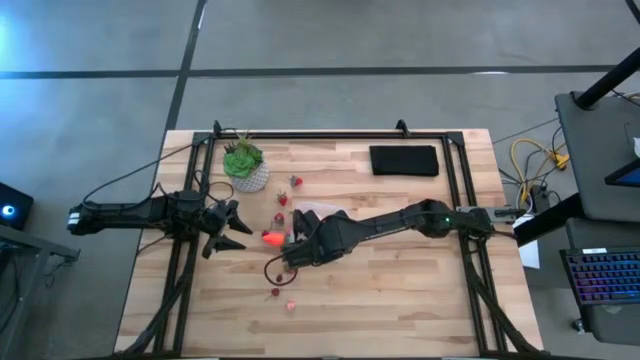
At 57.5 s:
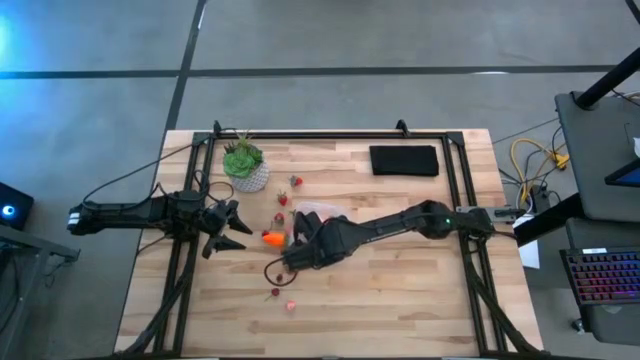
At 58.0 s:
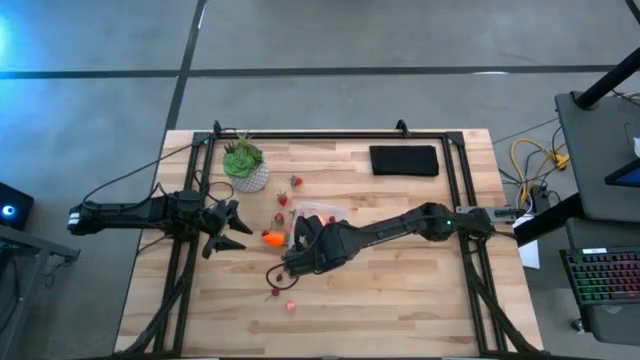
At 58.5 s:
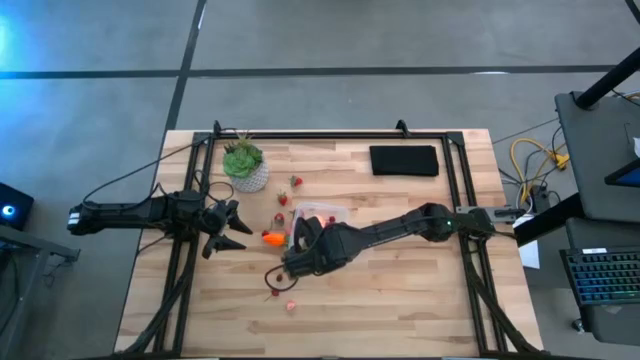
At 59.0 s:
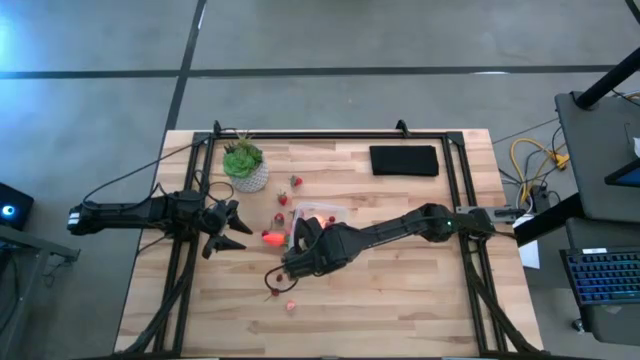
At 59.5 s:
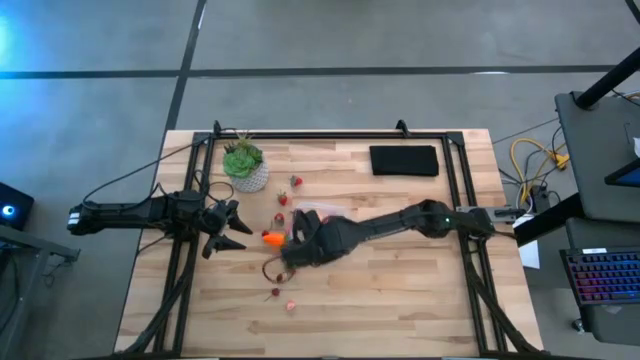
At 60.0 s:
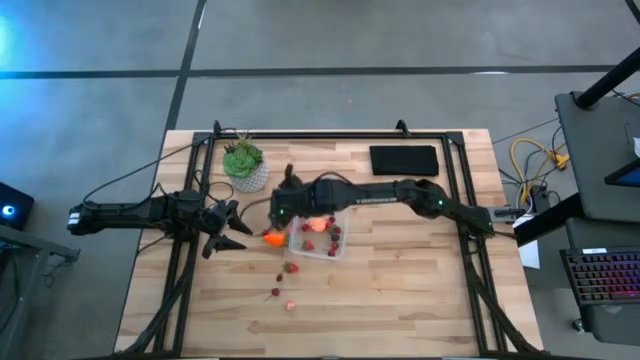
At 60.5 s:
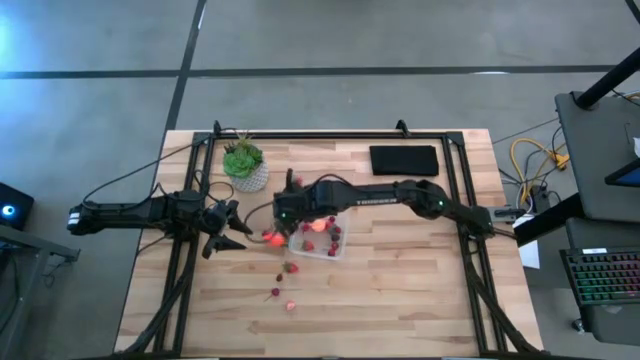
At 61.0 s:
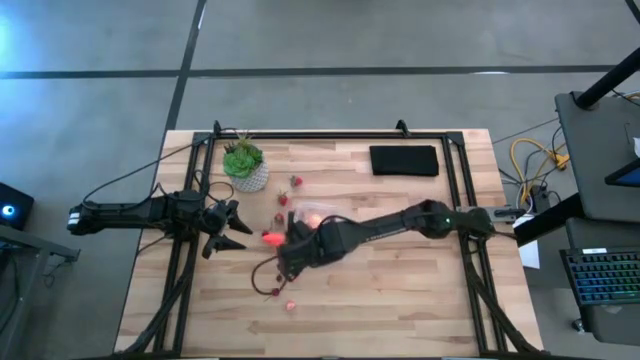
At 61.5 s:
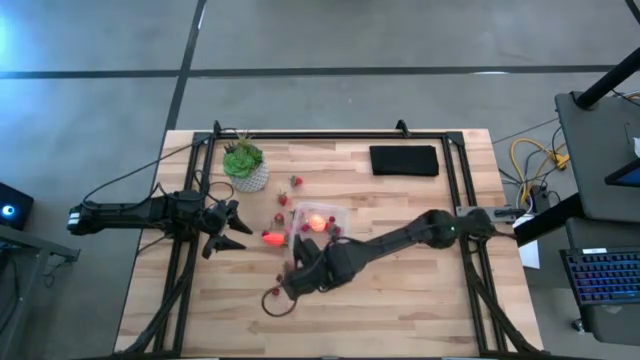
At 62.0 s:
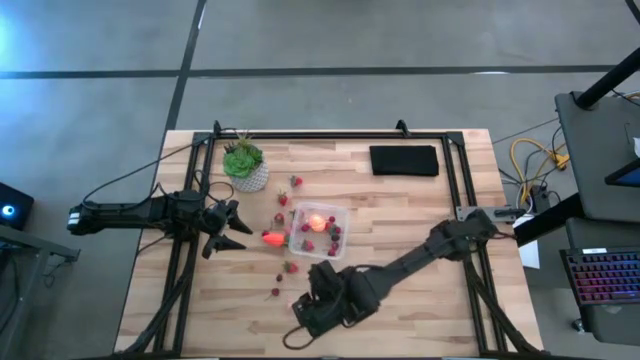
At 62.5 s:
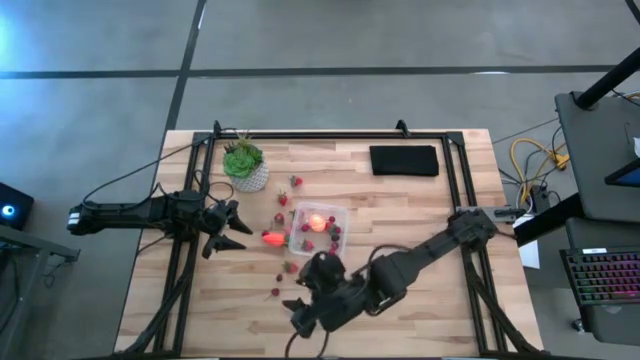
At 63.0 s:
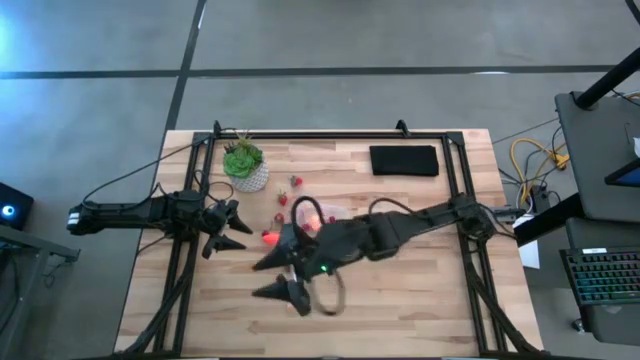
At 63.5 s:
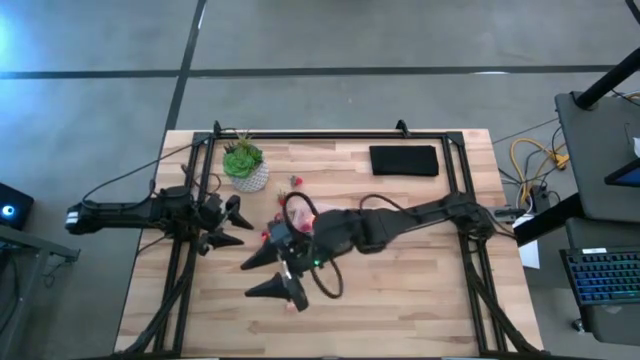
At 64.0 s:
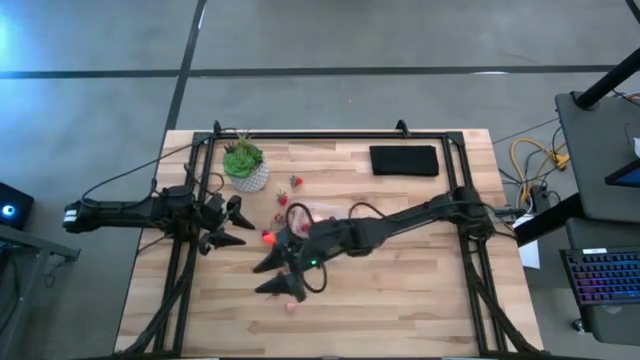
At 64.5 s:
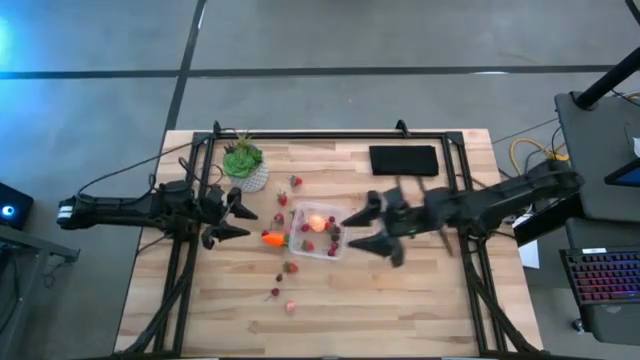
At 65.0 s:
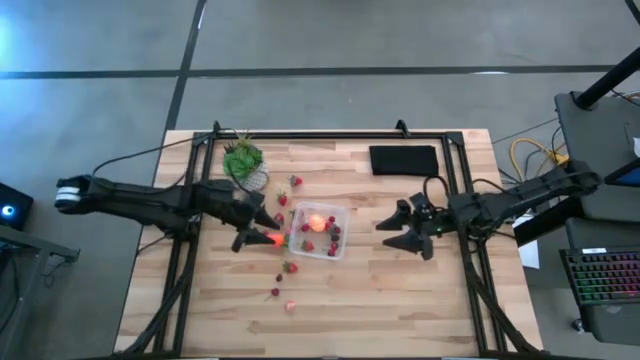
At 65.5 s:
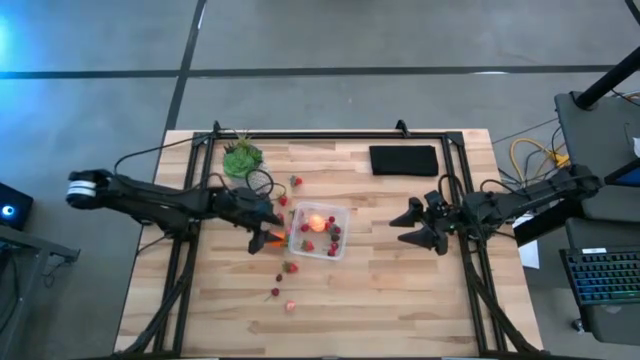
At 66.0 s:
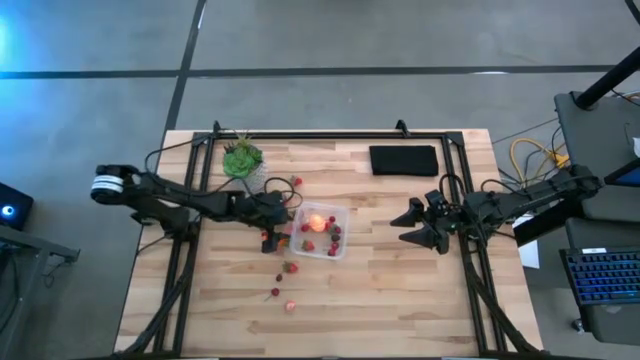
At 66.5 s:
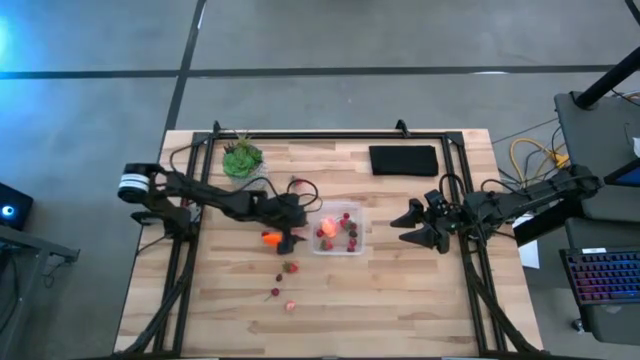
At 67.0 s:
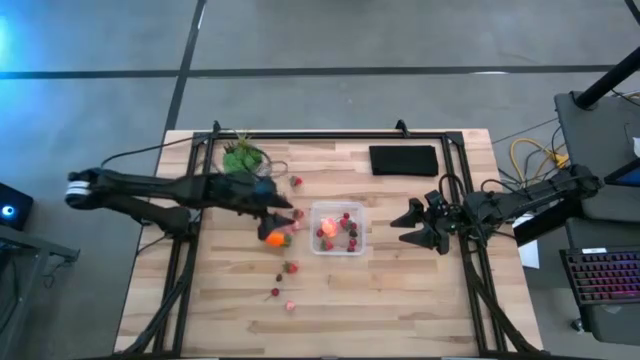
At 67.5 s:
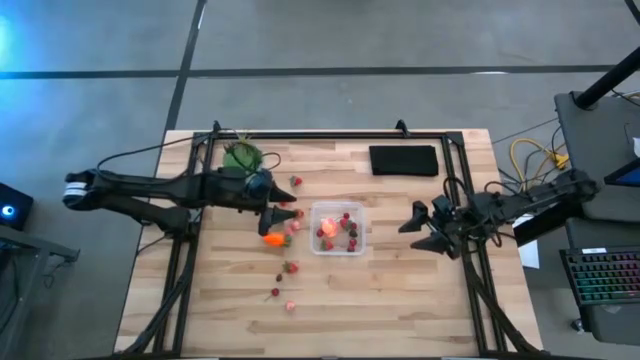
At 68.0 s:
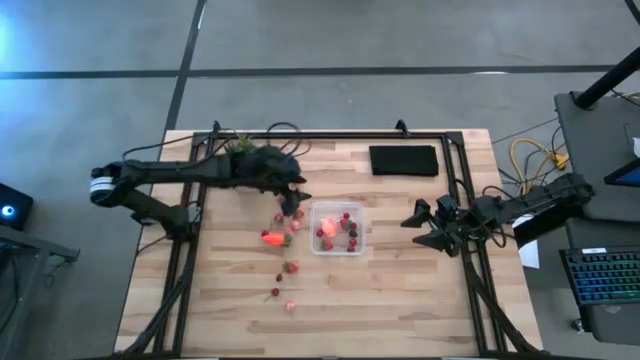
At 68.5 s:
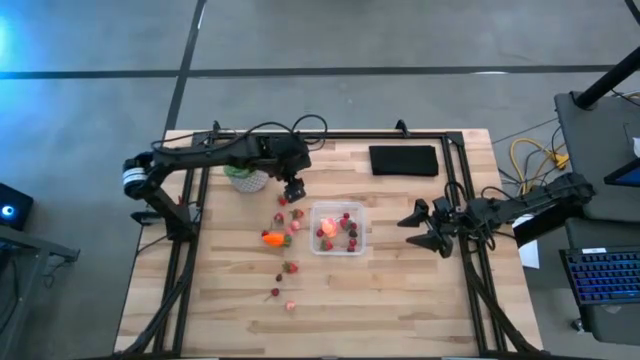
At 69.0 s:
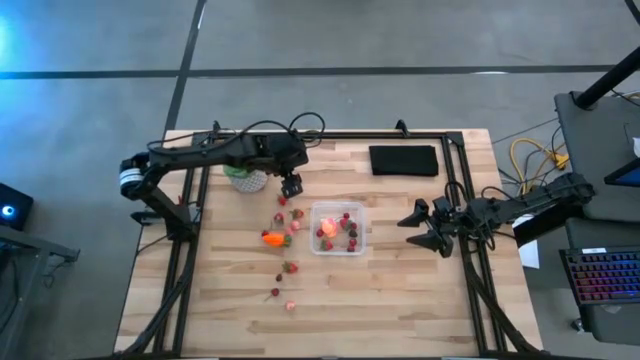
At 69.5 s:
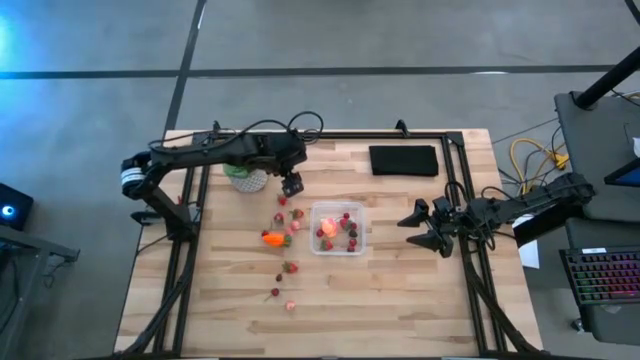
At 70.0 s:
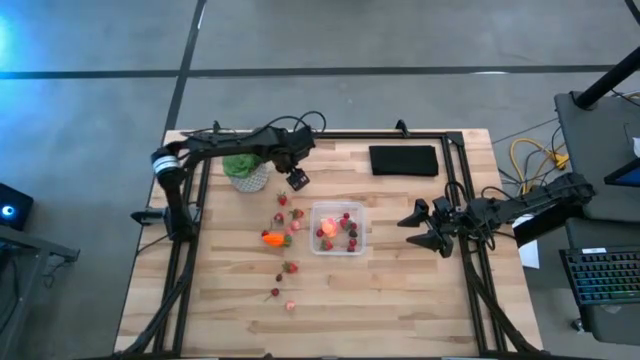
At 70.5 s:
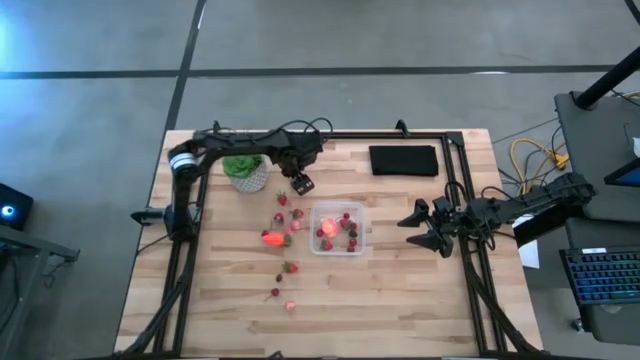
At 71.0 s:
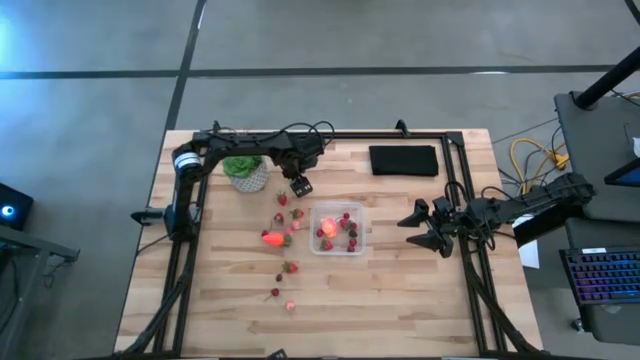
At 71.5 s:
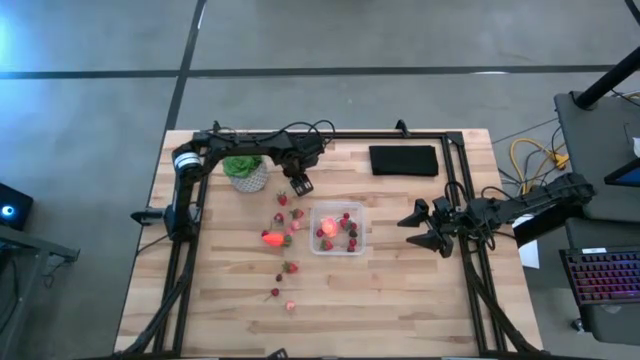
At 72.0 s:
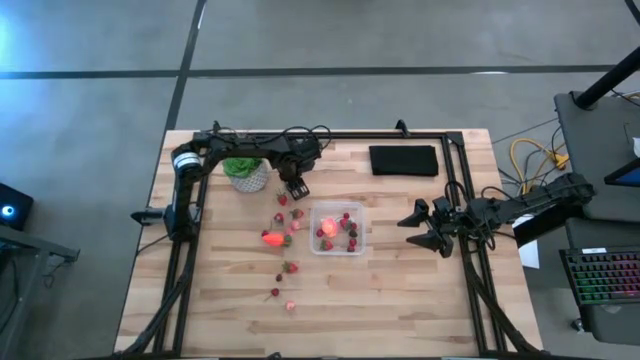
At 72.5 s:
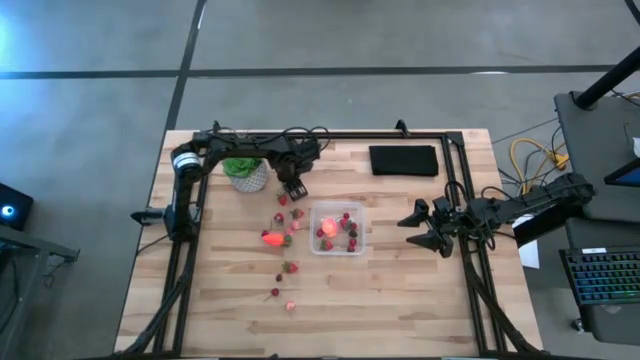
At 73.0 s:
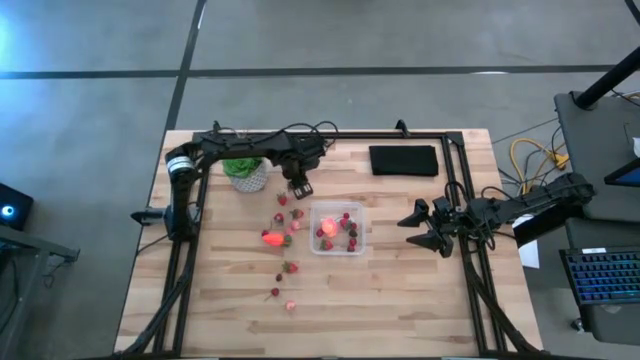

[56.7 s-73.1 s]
Task: Pick and placing Produce into tupperware
Put the strawberry into the transparent container

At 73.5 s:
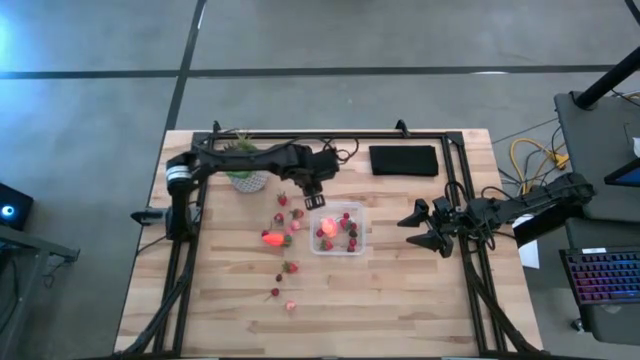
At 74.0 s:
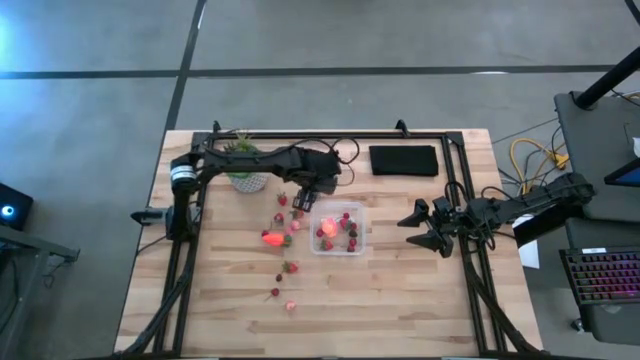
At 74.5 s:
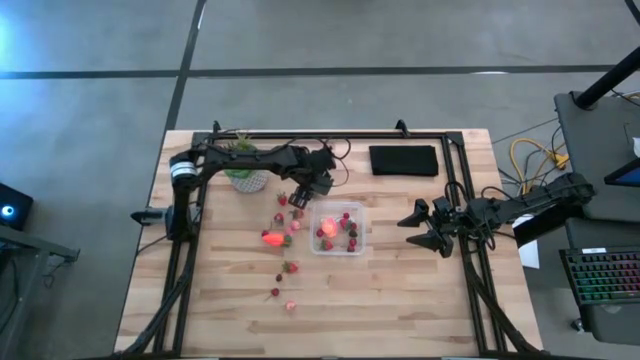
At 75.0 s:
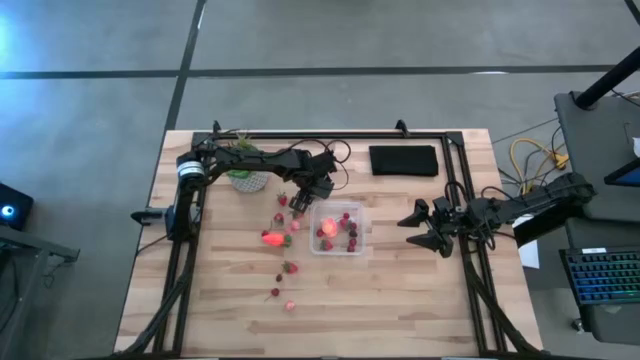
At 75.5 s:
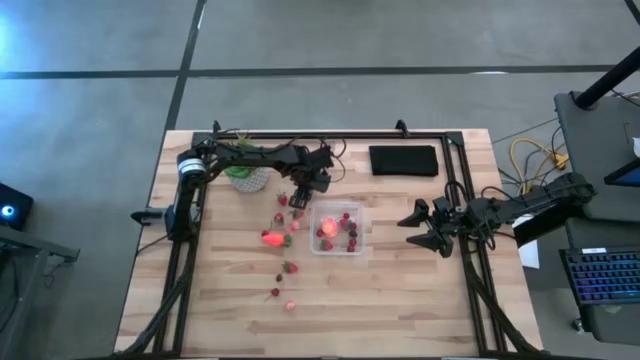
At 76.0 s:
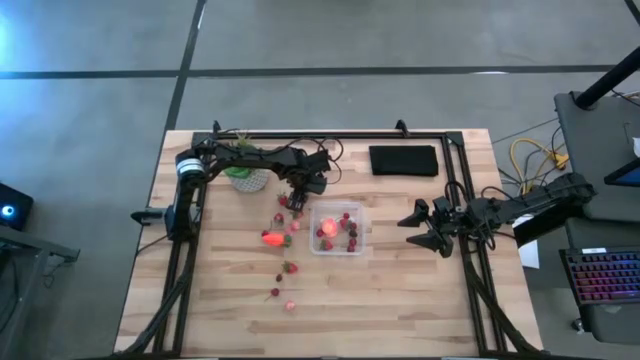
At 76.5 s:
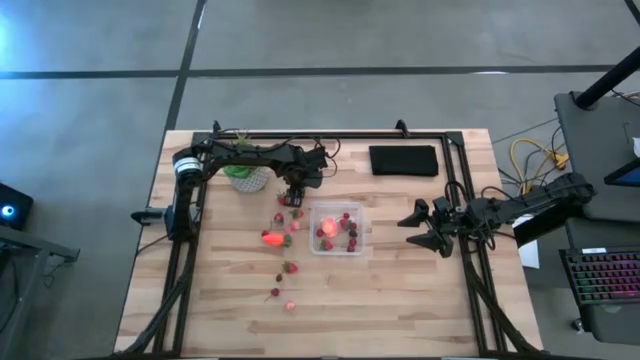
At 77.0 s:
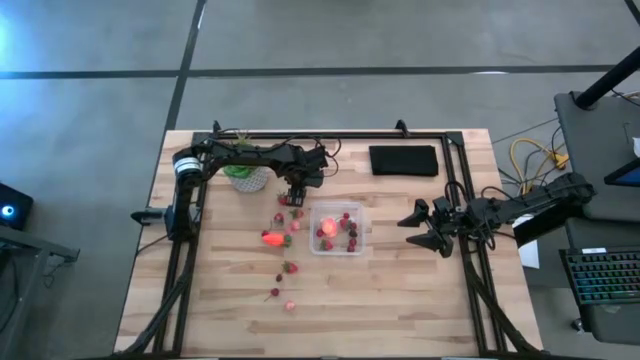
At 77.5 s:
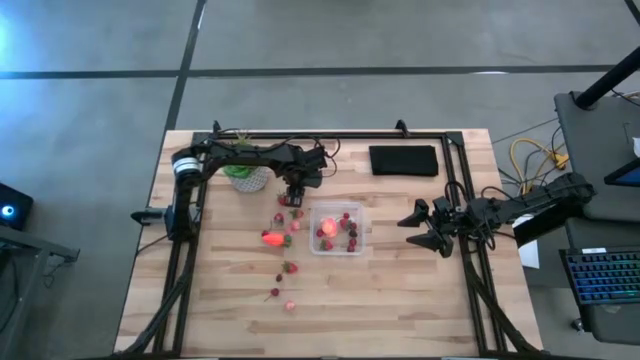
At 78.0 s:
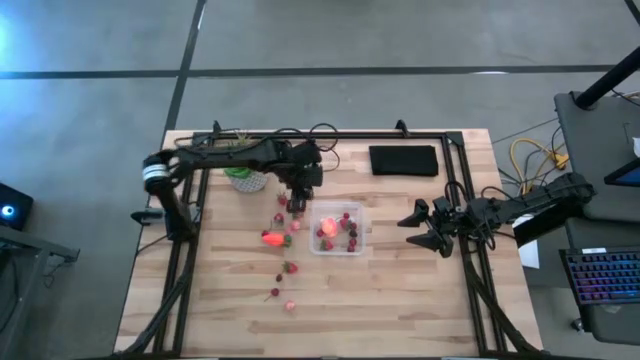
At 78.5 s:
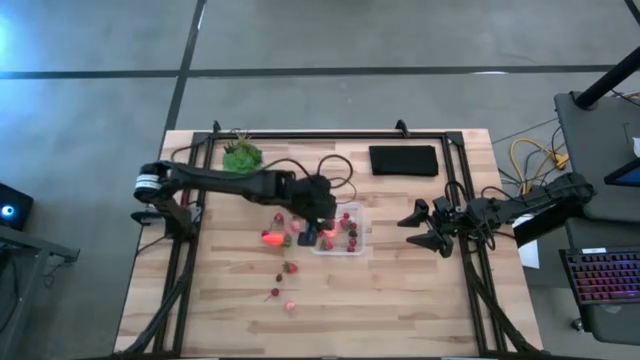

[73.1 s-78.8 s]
Put the strawberry into the transparent container

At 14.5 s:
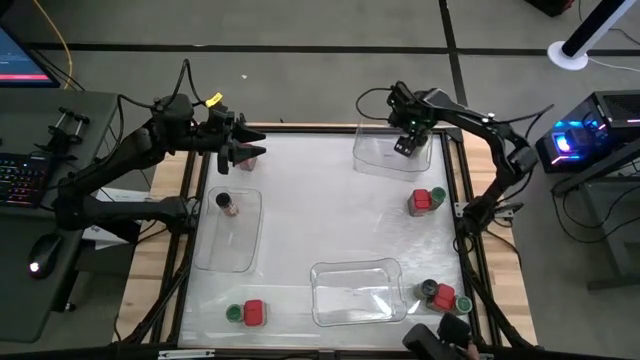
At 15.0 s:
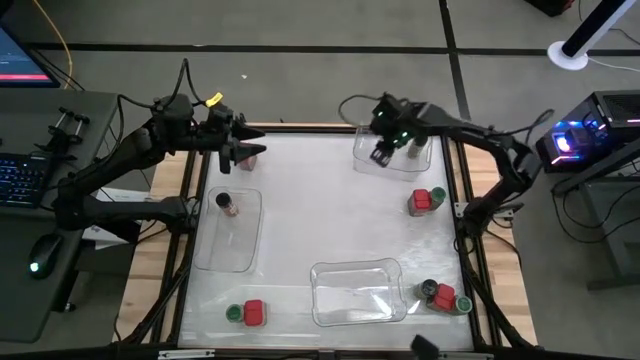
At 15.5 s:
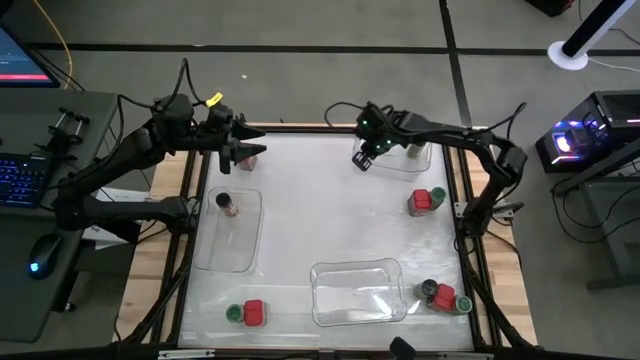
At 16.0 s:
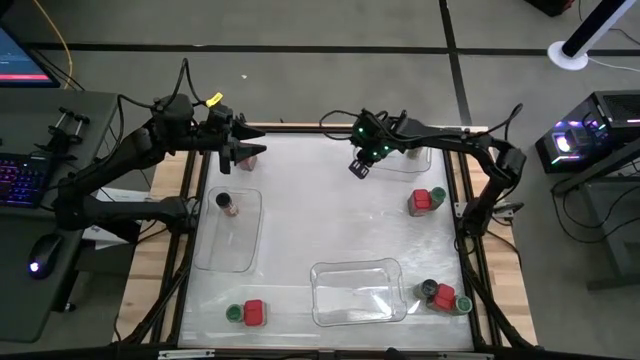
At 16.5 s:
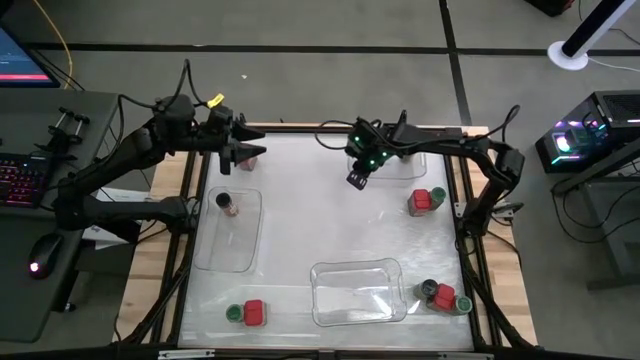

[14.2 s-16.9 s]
Task: Sort spices by type
Adjust the top right transparent bin
